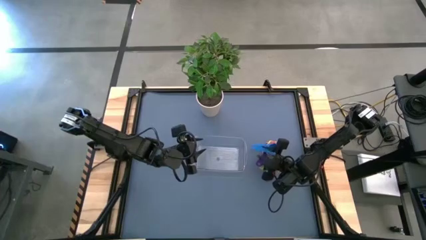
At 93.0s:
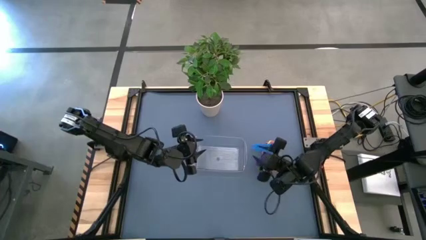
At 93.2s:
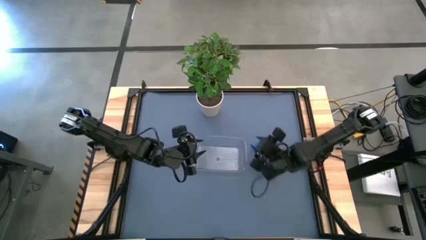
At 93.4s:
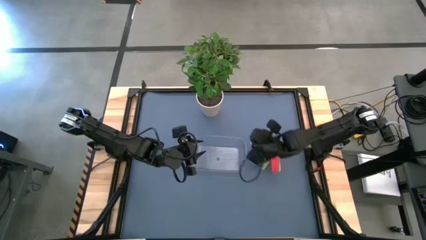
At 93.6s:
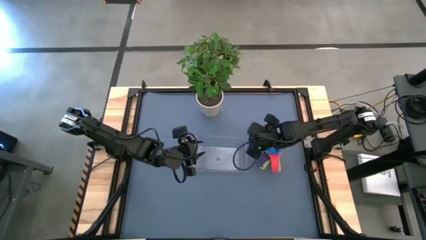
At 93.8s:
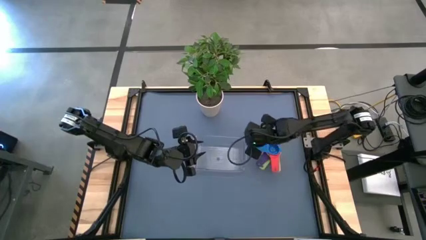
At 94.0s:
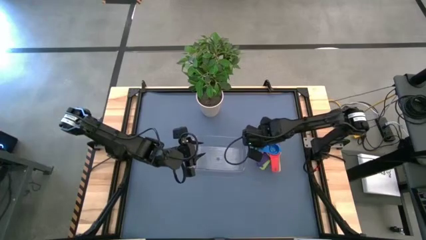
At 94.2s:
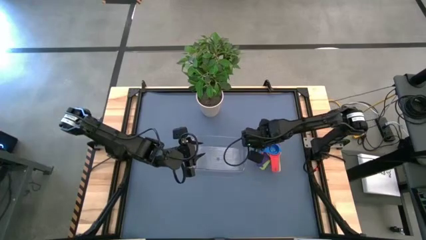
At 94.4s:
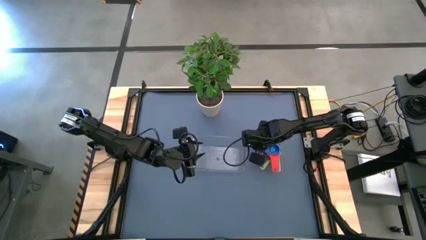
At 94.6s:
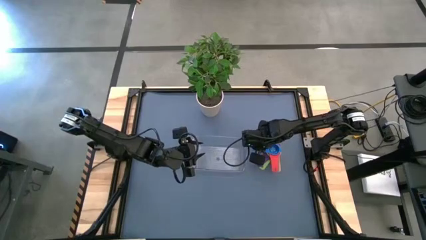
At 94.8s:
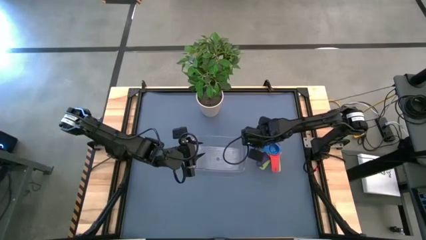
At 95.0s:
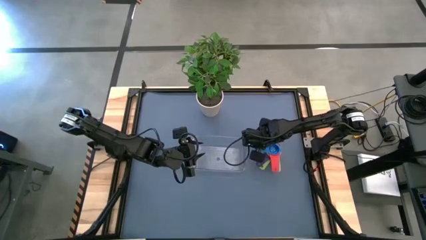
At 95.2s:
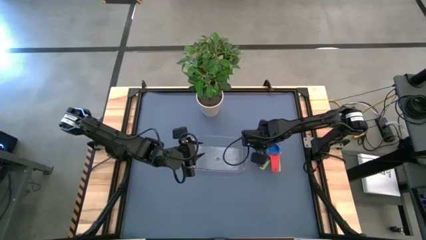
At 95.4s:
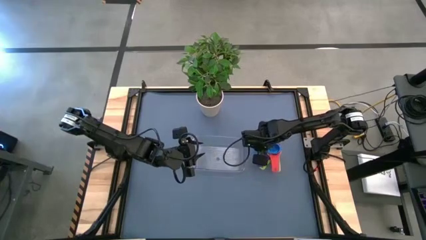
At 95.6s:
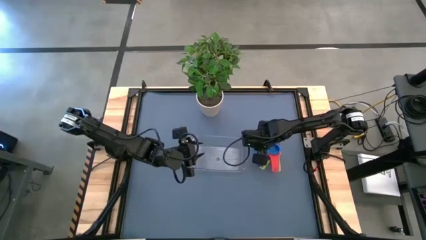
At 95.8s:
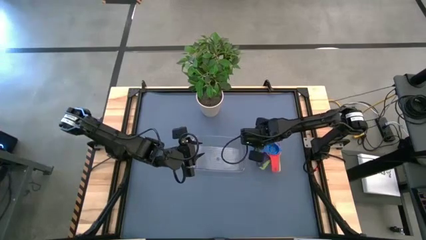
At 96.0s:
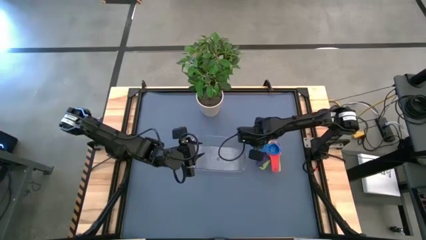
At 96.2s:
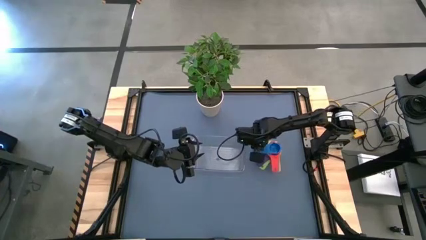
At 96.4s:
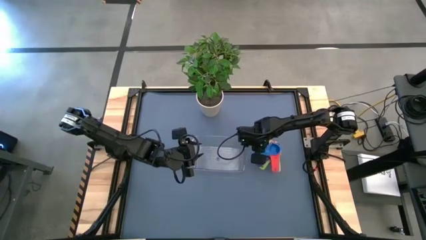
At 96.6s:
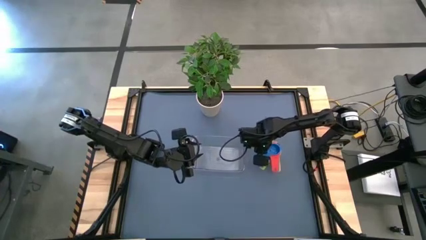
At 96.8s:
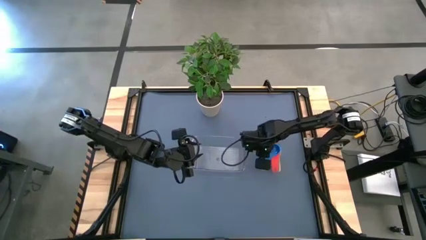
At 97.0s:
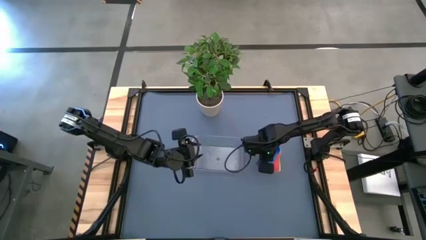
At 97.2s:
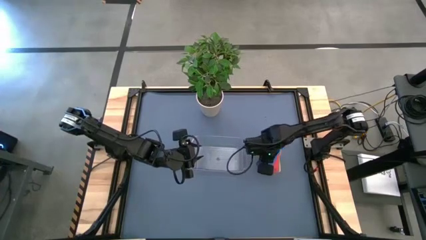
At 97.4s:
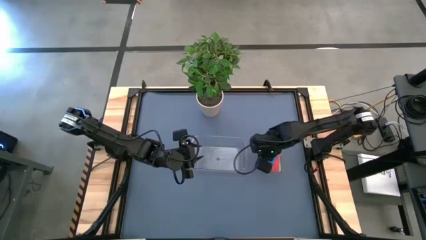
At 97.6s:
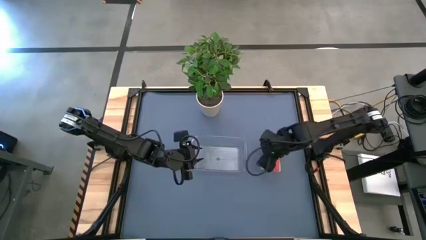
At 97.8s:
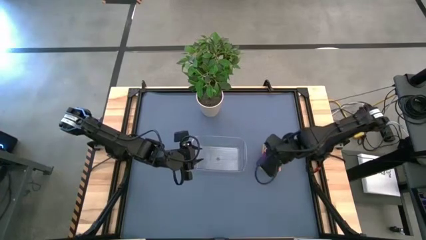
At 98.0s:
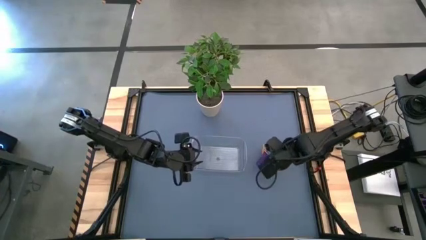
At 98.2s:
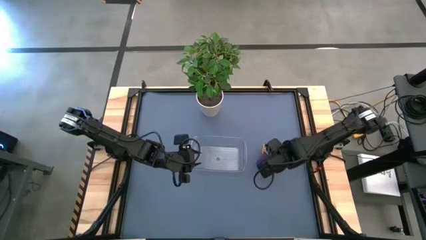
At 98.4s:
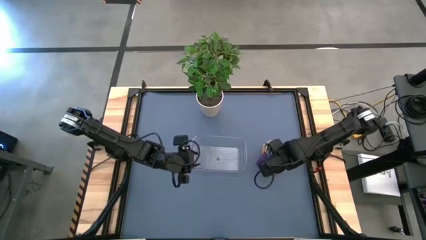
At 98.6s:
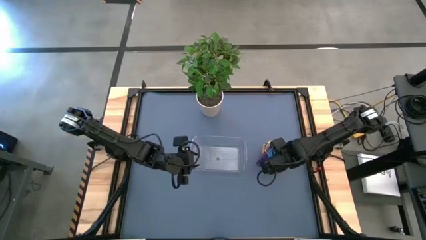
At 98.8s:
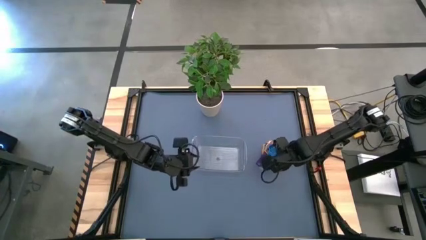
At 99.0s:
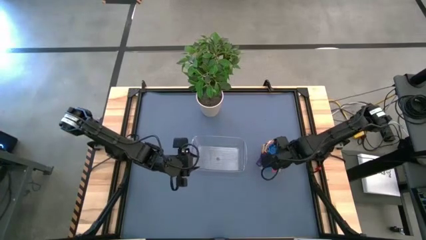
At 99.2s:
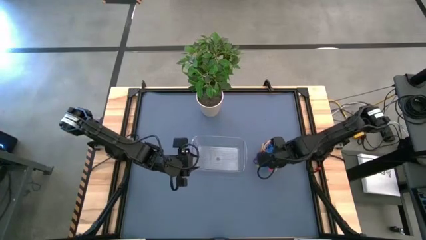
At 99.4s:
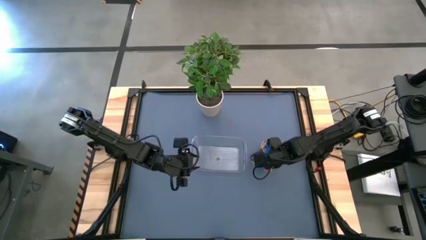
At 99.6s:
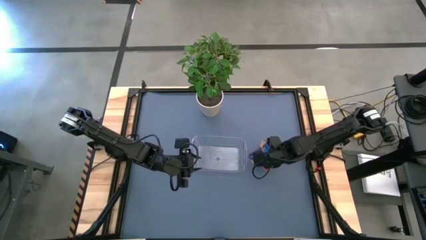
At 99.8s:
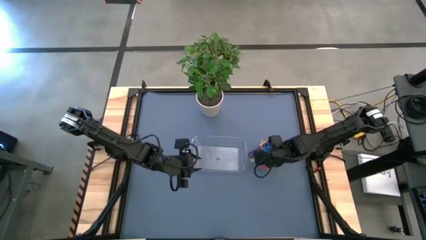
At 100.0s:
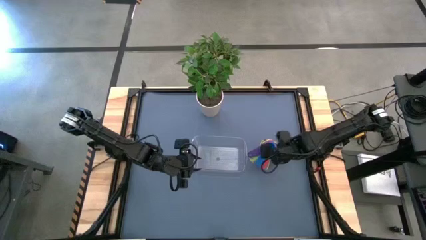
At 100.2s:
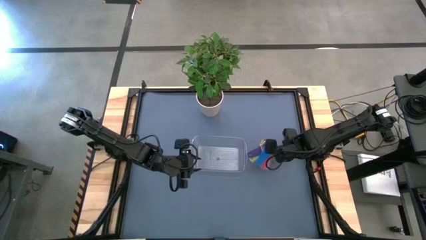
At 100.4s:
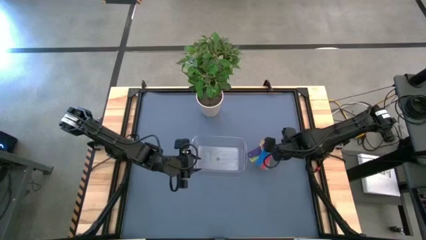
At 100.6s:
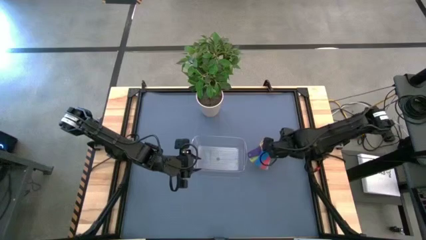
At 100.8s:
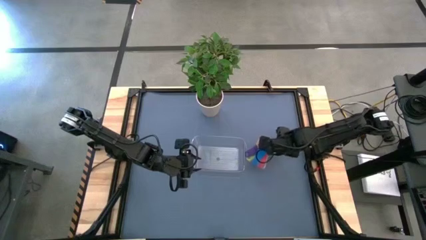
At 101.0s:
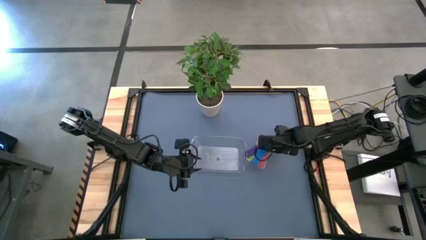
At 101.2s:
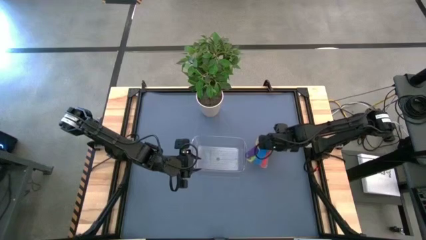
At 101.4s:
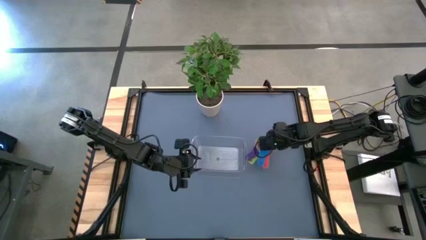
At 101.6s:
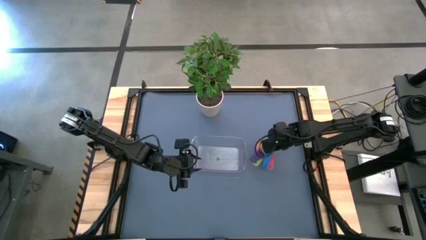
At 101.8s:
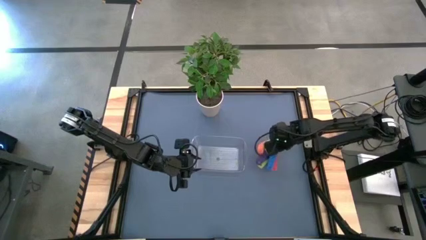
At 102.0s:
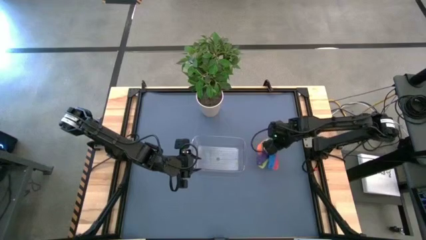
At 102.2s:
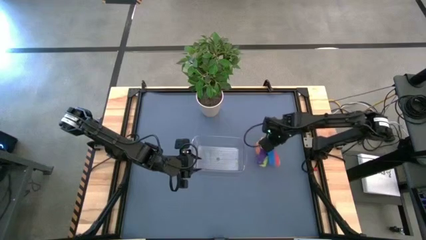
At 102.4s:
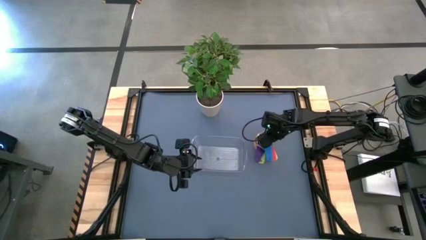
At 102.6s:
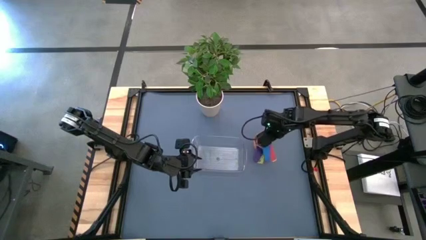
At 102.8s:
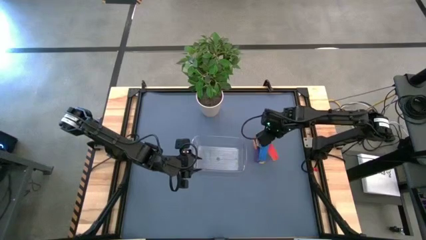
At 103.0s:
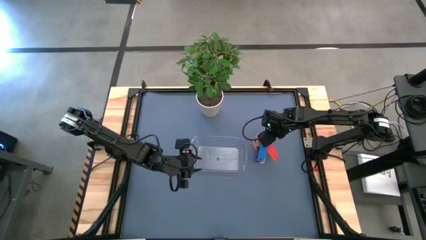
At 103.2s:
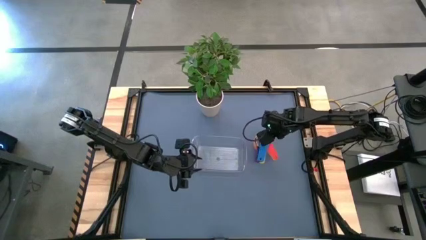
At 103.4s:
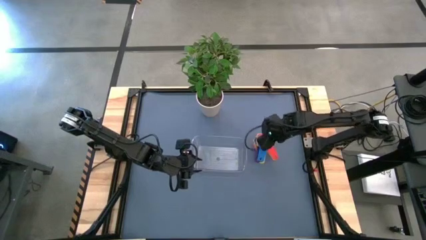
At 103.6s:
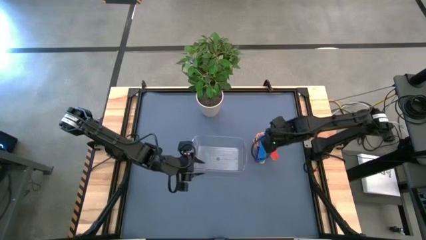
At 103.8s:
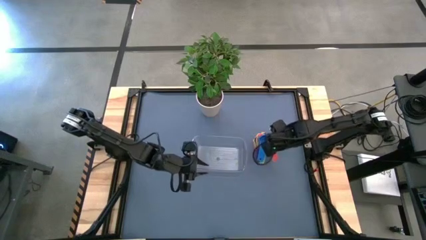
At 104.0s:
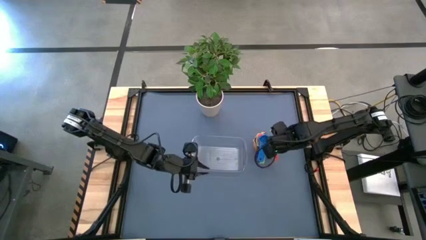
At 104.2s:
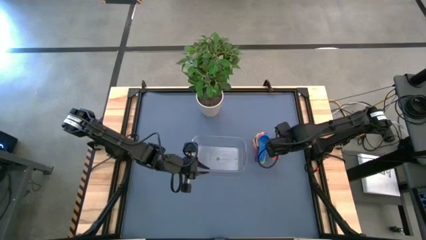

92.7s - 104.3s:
Task: Nest measuring cups in basket
Adjust the stacked measuring cups

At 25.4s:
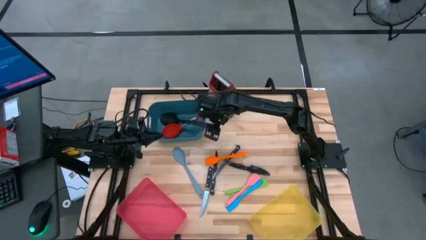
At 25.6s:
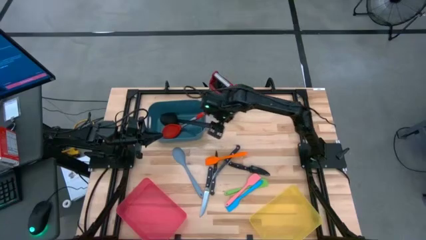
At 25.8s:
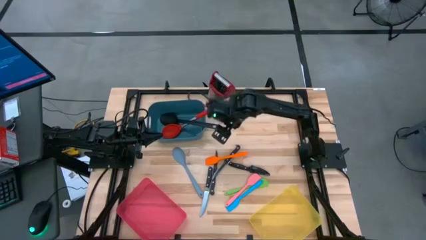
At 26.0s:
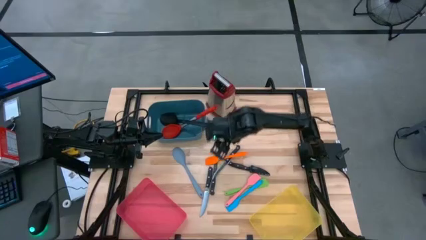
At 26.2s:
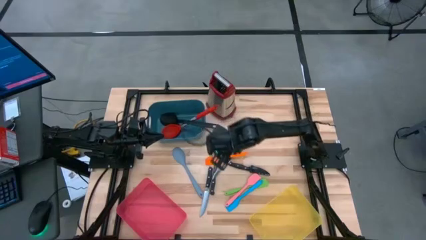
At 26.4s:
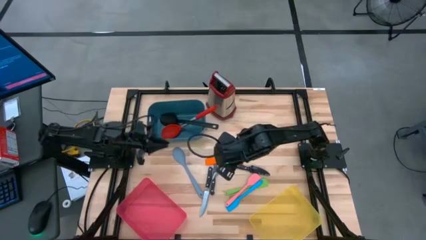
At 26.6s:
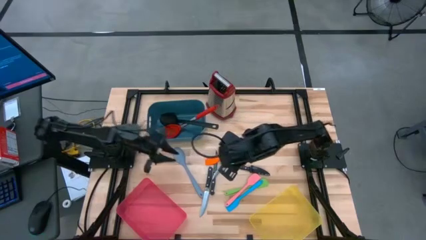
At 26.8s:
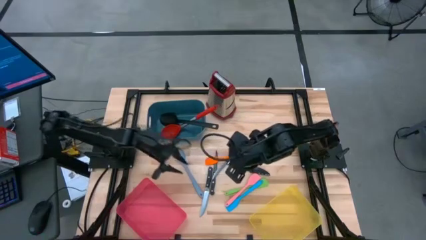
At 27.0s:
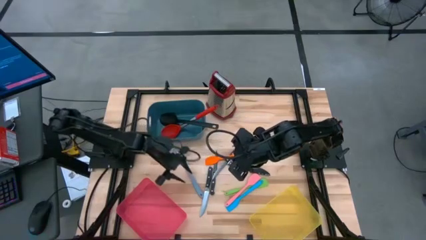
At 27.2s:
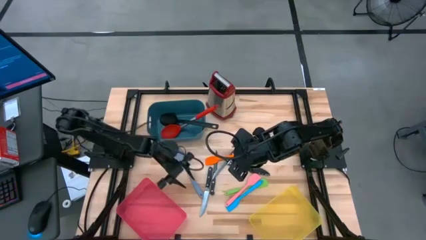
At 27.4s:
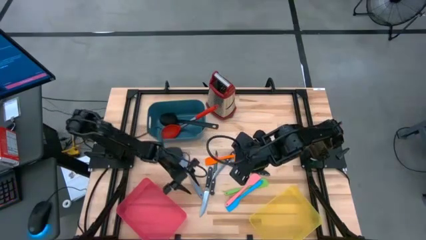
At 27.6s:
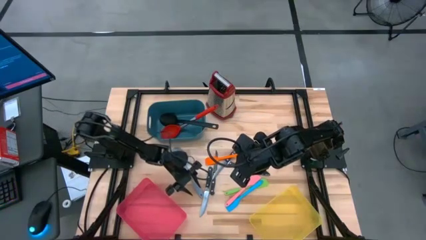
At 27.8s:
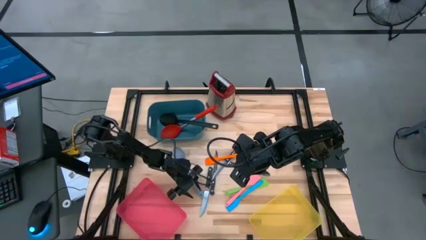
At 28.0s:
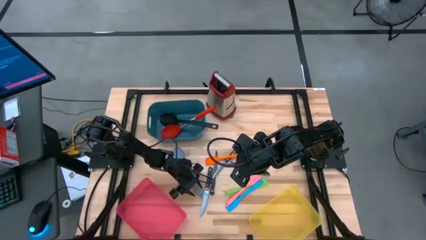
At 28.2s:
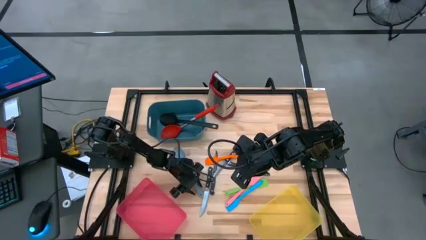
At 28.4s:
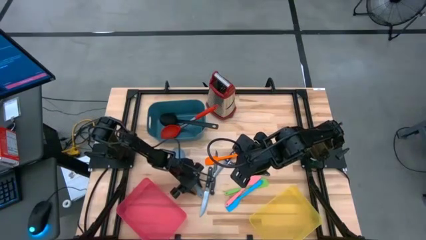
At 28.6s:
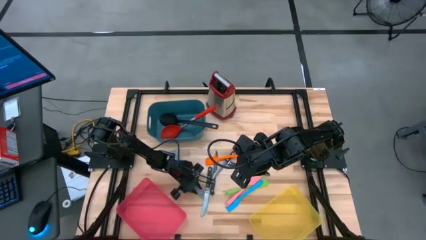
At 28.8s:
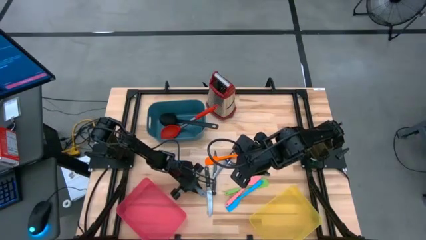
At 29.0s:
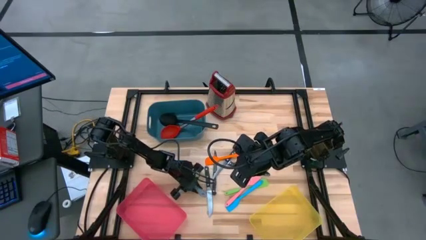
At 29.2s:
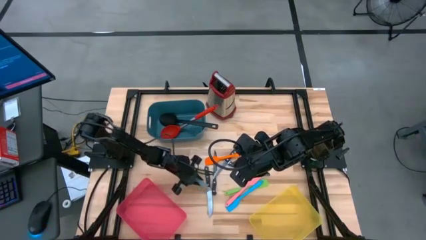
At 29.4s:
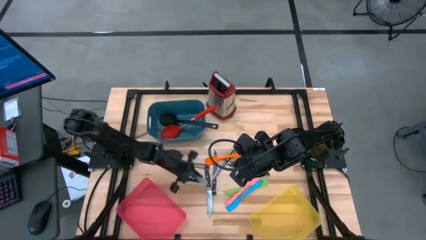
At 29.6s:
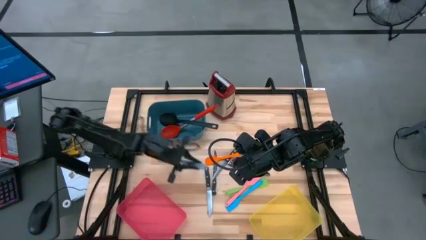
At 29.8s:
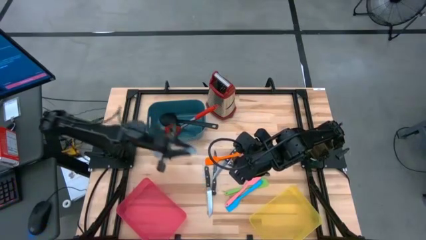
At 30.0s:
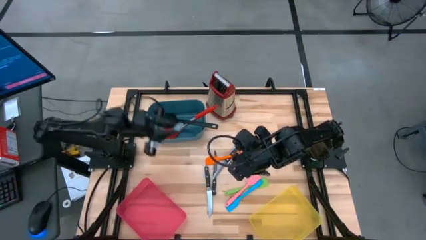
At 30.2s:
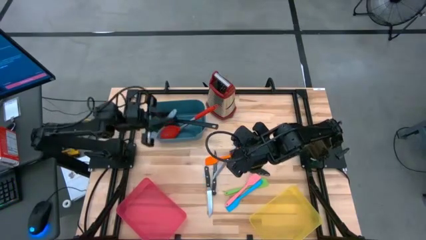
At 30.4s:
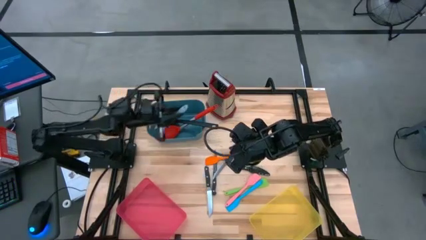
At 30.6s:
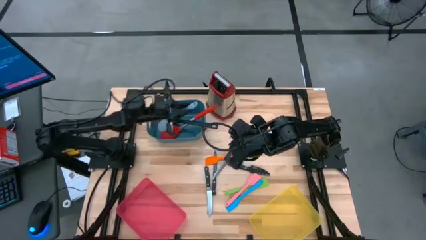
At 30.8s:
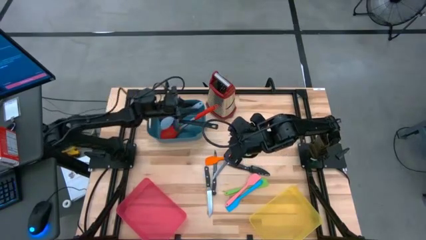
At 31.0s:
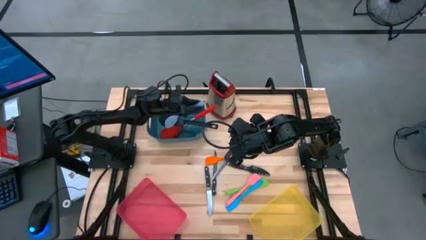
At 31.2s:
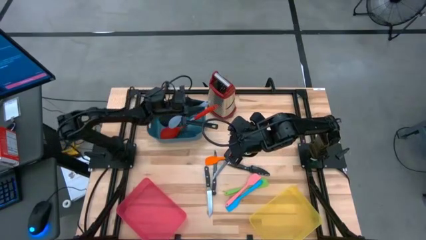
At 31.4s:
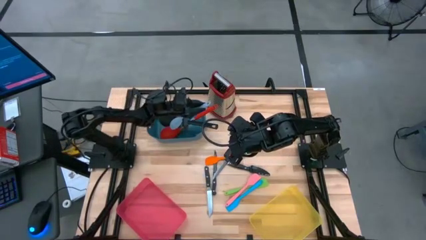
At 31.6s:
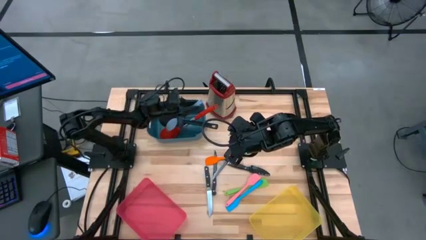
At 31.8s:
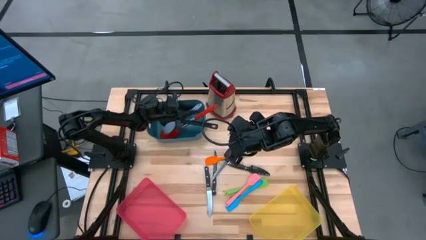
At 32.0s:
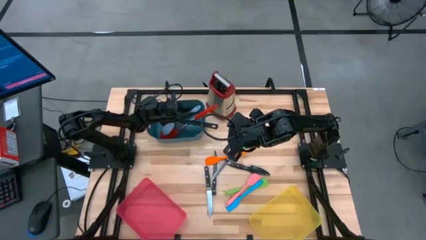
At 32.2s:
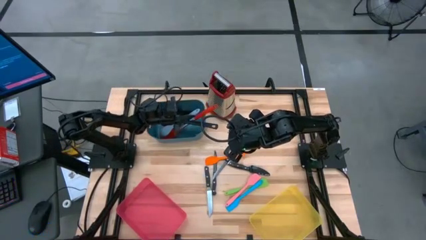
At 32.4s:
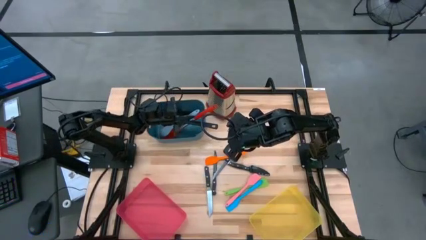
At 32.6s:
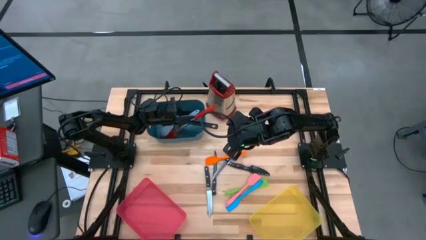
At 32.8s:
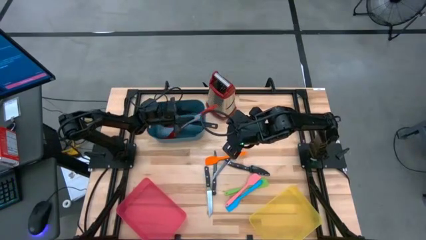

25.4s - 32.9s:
Task: Pick & Place Kitchen Items
Put the gray serving spoon into the blue bin
